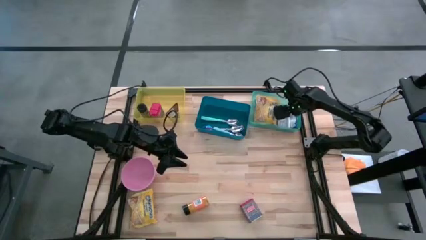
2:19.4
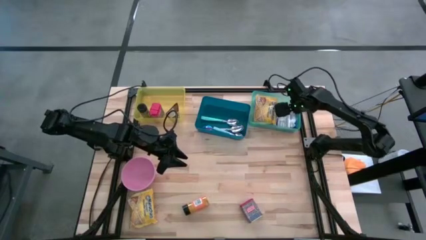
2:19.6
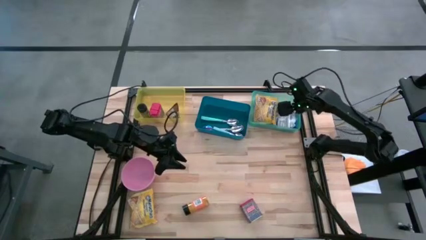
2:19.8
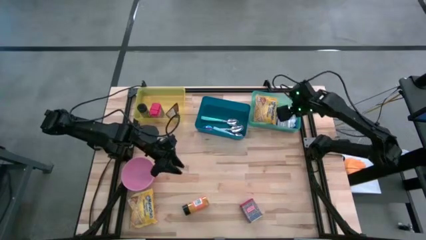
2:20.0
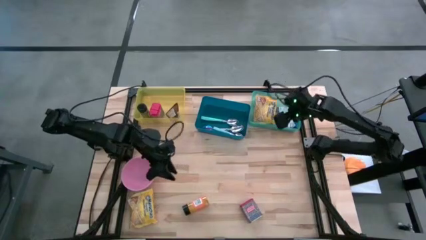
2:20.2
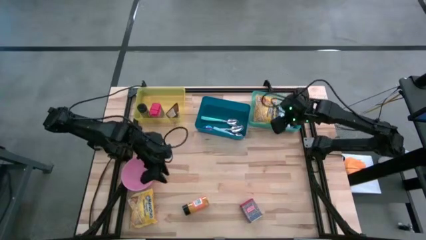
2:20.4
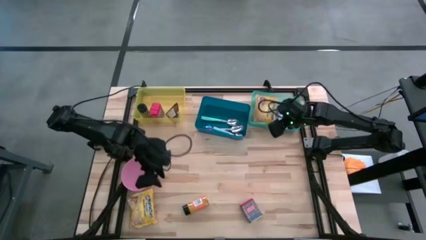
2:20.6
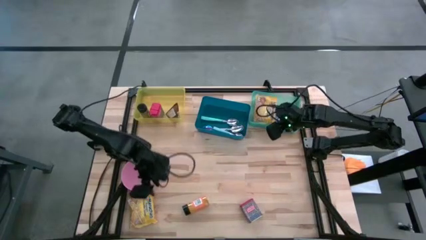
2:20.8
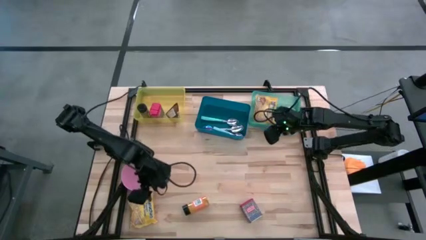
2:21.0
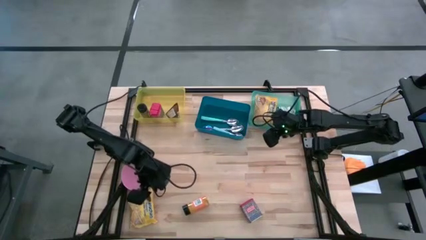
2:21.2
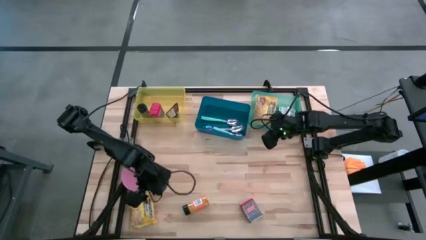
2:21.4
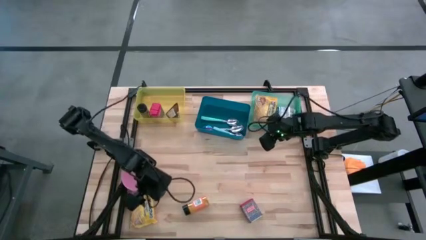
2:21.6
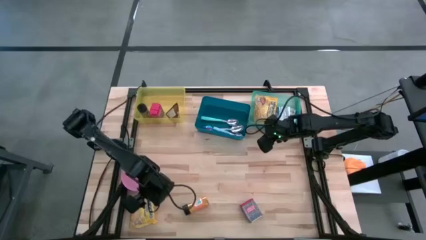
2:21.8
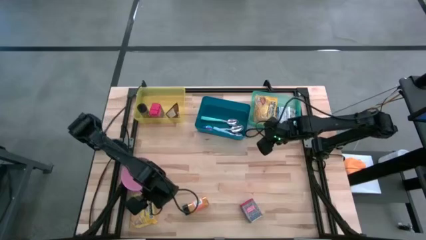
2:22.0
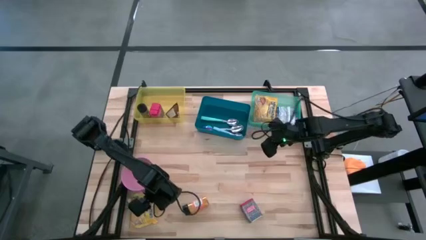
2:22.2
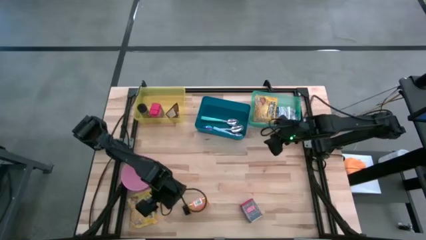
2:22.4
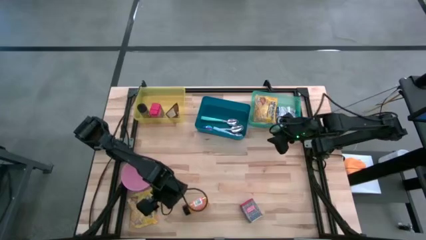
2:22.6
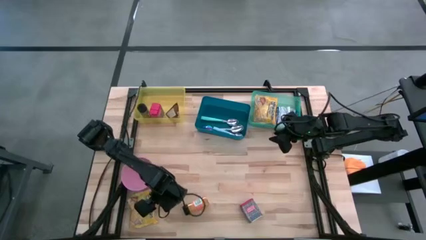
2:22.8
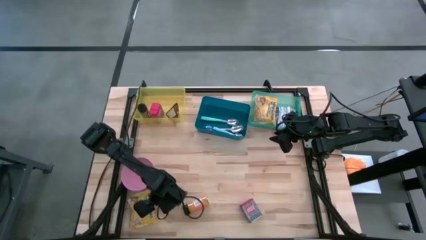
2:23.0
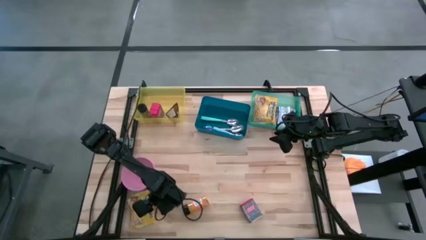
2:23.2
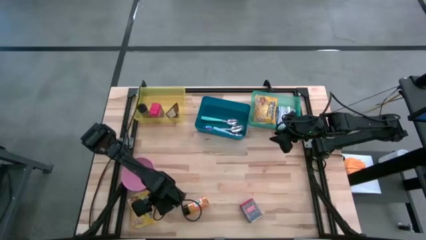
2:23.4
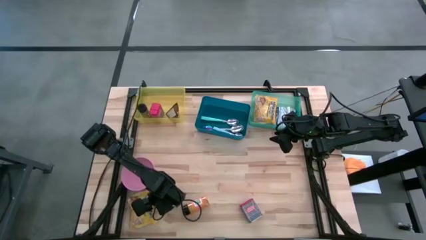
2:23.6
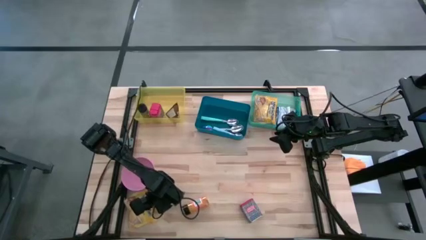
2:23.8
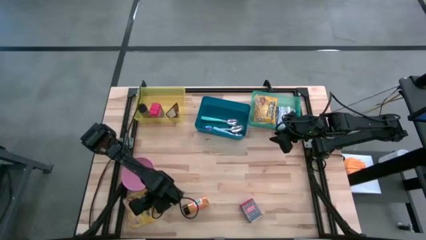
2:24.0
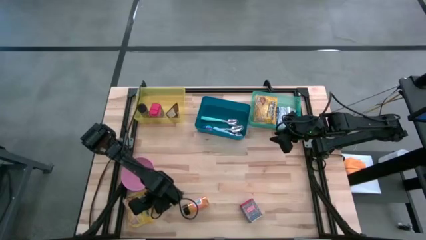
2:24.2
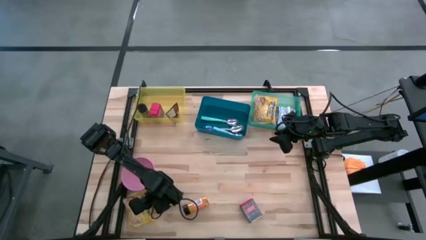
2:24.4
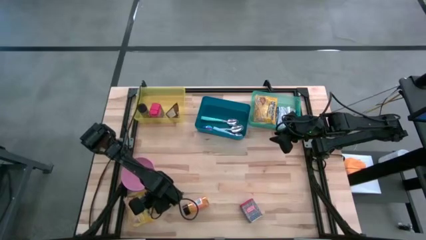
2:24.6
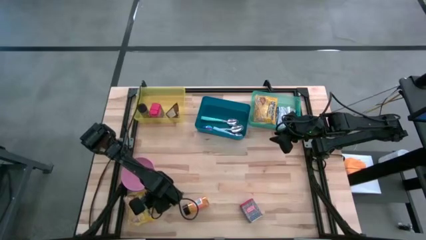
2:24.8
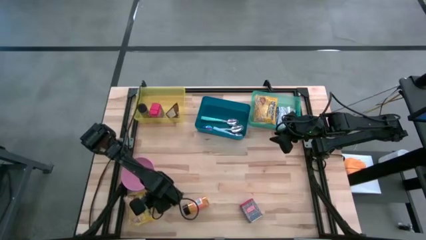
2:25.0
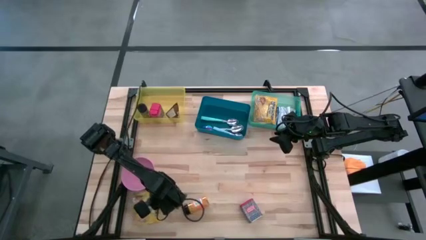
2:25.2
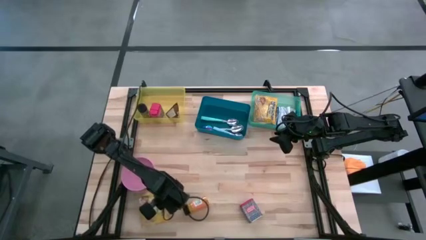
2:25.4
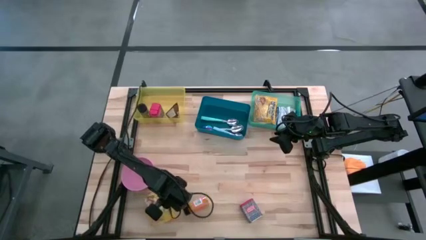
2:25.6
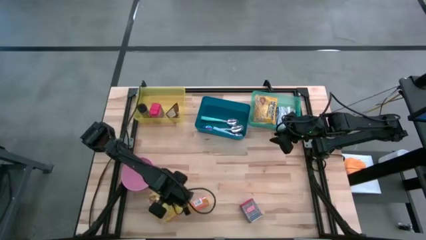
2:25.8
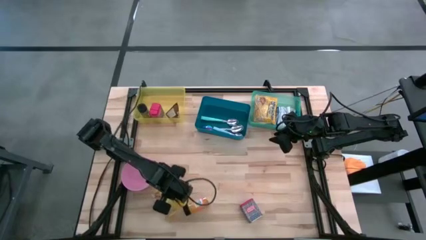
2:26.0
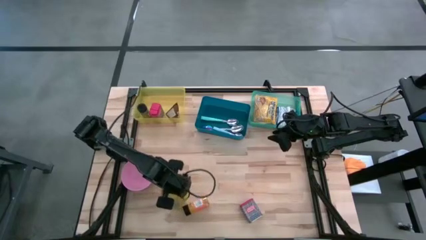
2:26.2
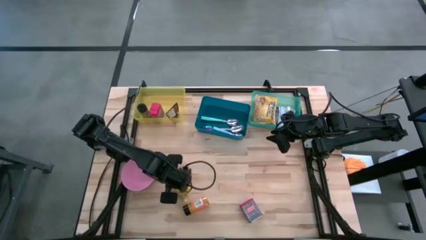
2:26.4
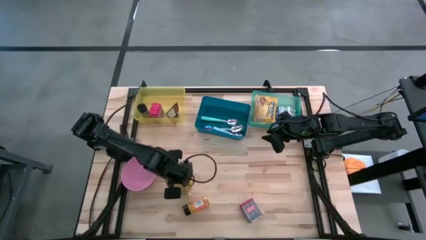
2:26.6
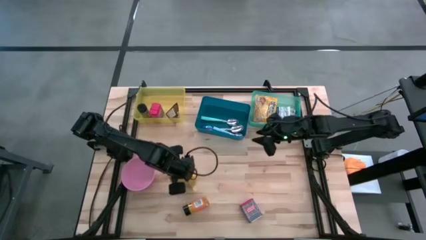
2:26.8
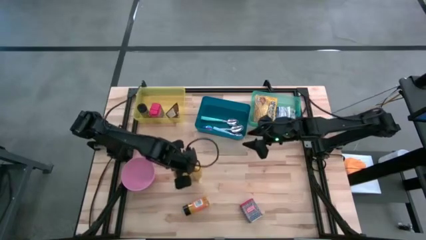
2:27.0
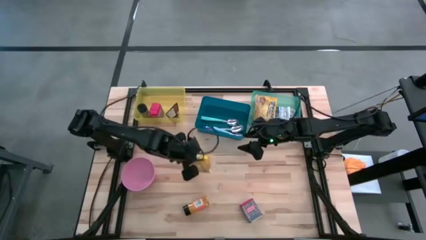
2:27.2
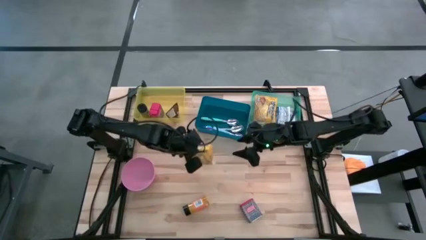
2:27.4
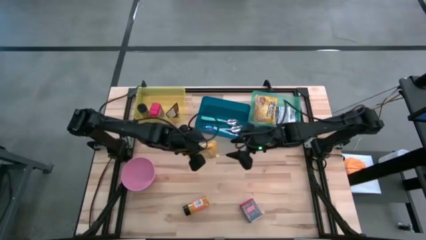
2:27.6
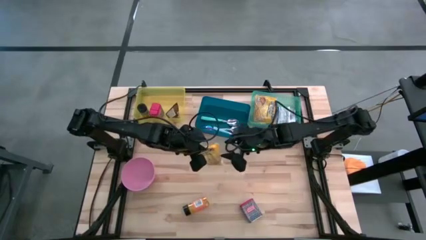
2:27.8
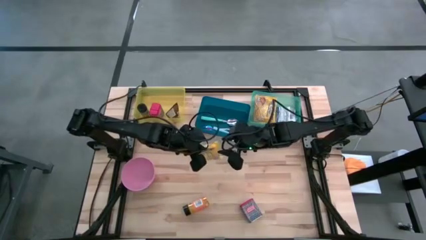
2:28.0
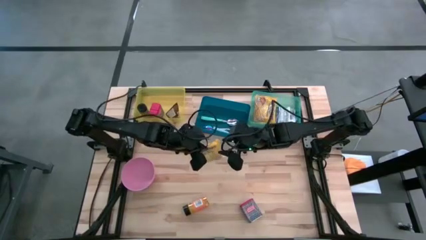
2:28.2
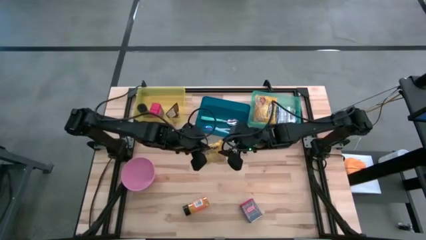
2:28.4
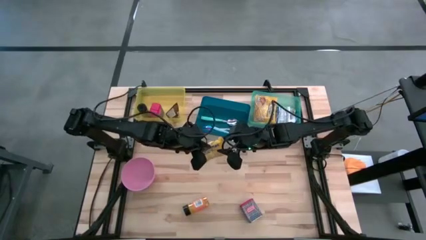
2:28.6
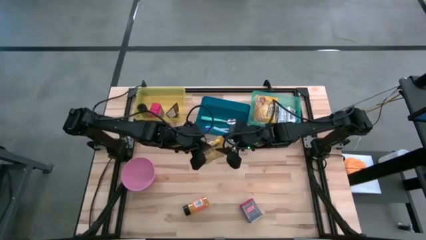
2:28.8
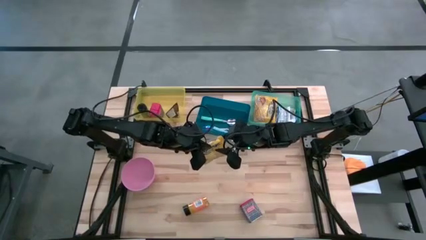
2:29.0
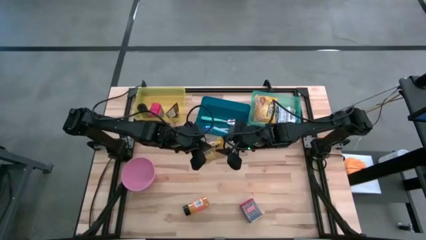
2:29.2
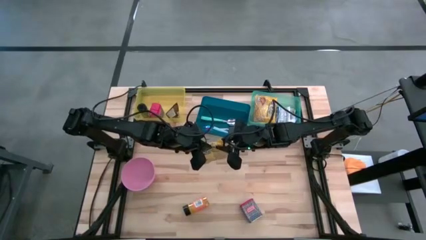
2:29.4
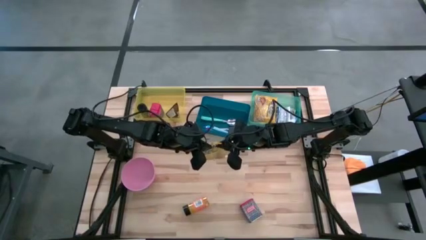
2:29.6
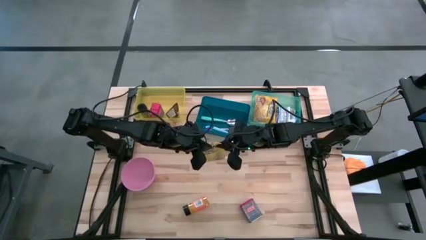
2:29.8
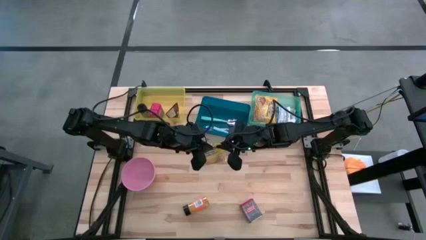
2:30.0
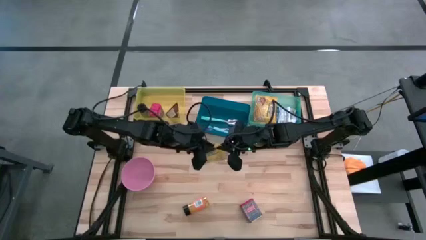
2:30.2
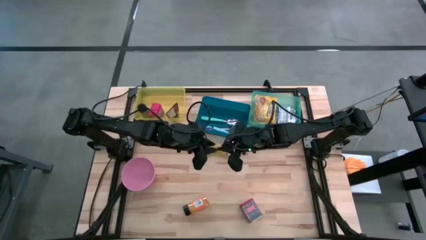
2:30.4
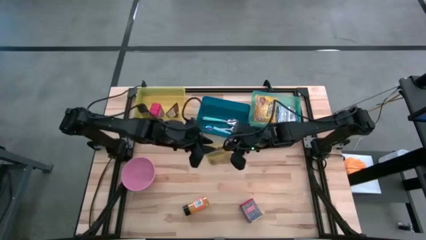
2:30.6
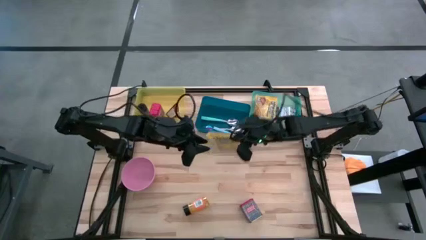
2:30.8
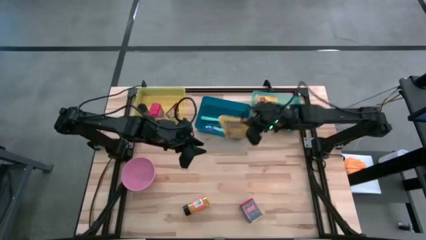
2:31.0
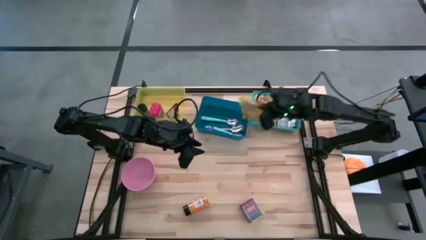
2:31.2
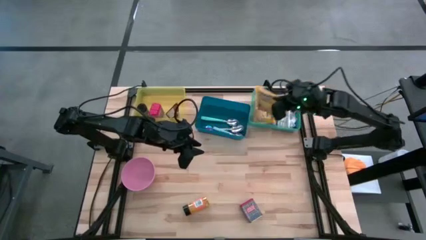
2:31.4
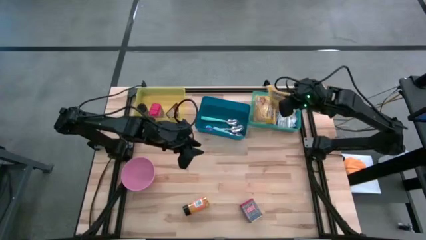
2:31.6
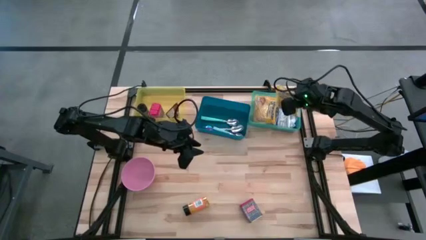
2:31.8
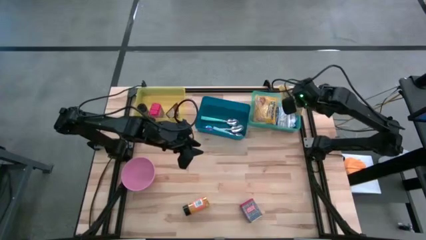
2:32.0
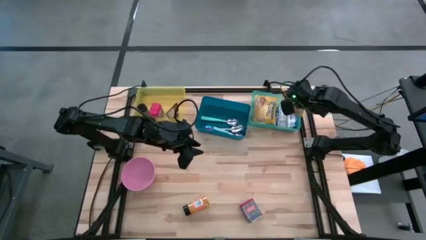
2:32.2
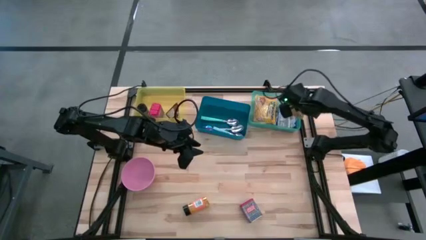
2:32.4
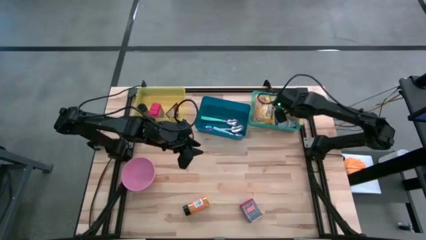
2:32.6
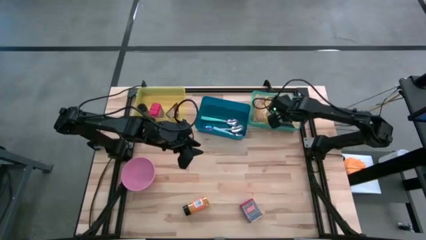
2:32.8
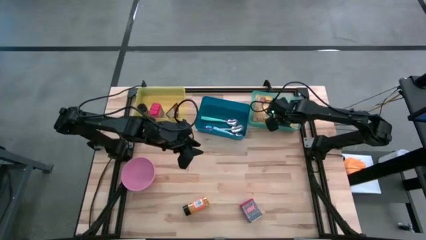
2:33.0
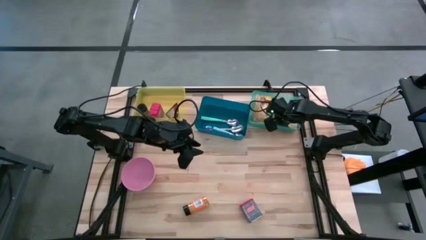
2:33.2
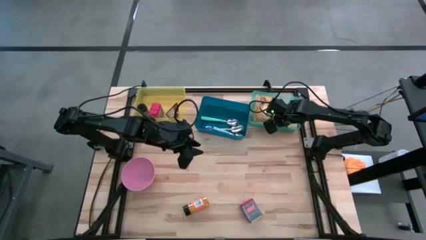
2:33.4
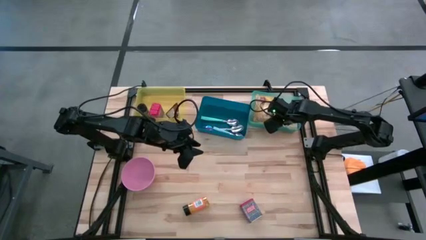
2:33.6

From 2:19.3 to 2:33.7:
Put the yellow noodle pack into the green bin
